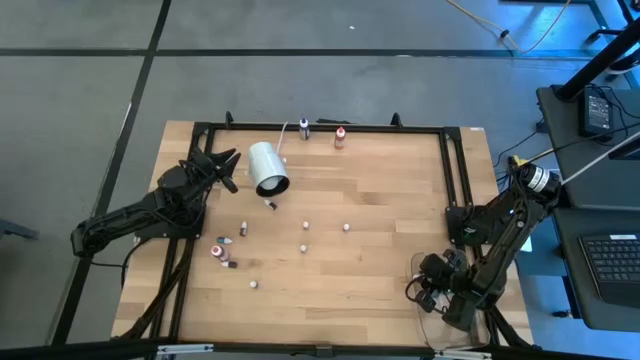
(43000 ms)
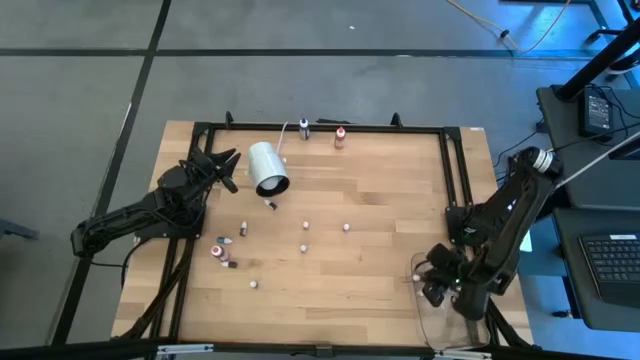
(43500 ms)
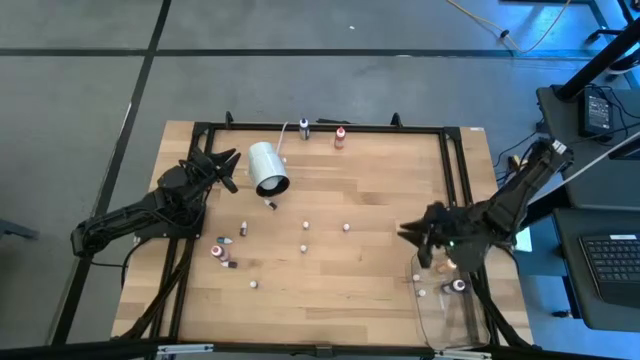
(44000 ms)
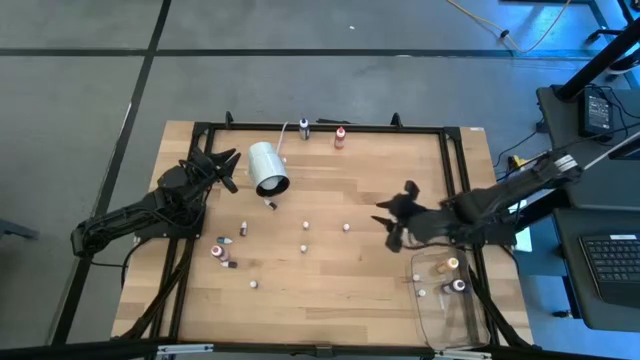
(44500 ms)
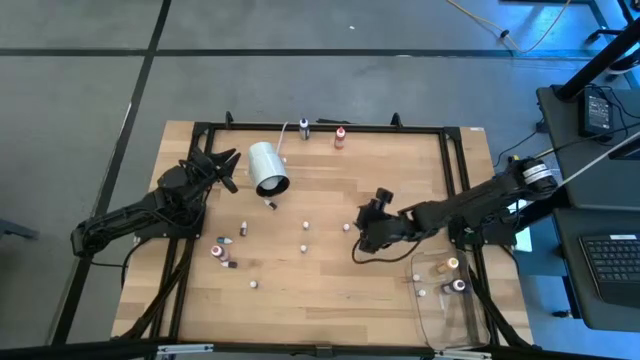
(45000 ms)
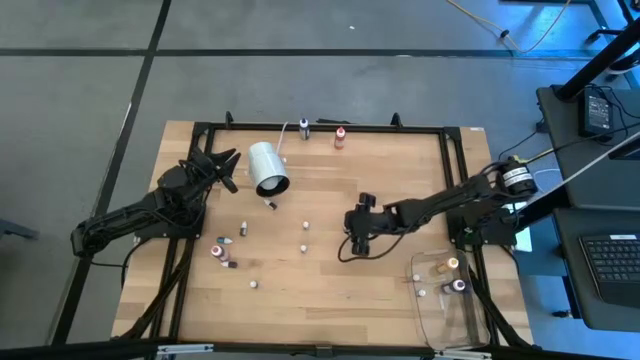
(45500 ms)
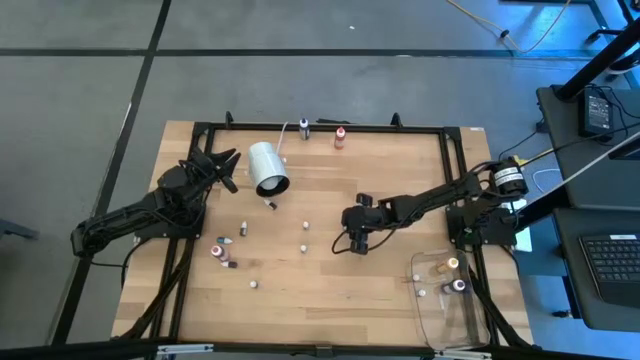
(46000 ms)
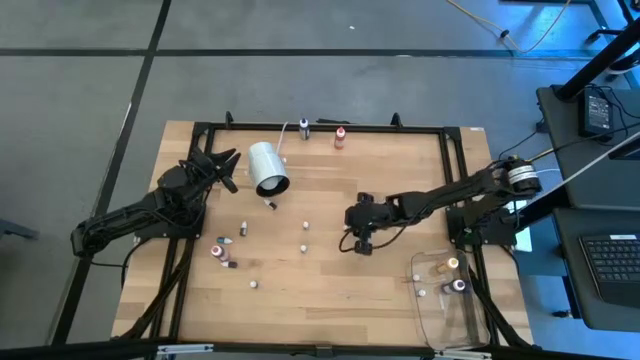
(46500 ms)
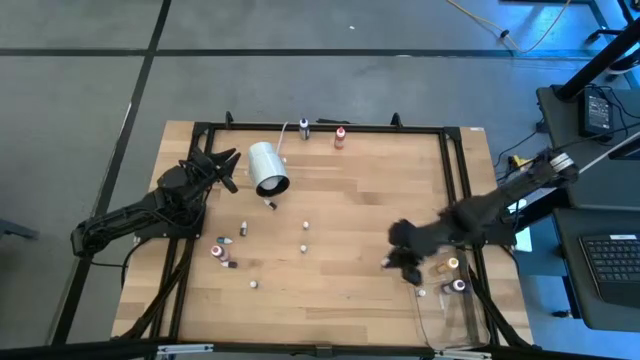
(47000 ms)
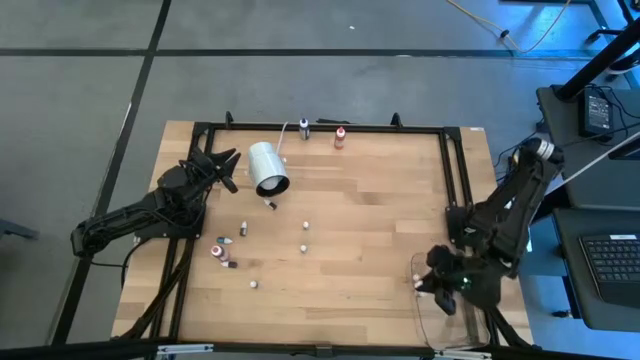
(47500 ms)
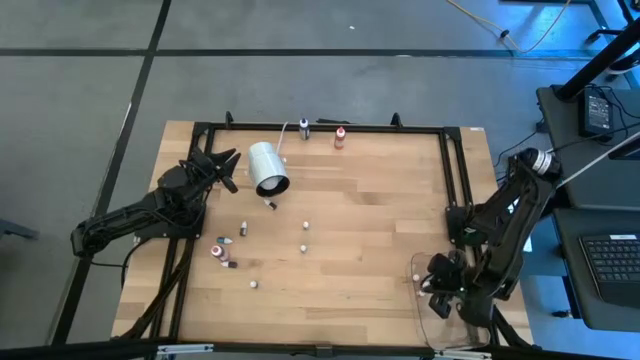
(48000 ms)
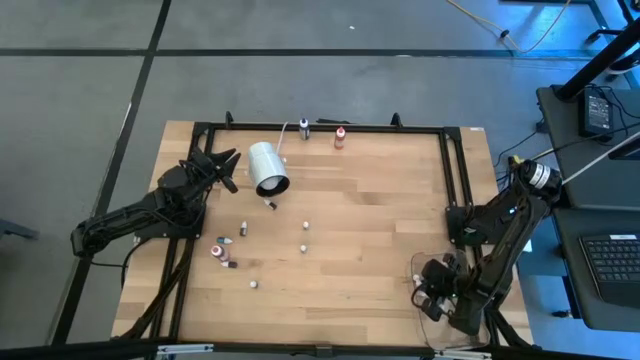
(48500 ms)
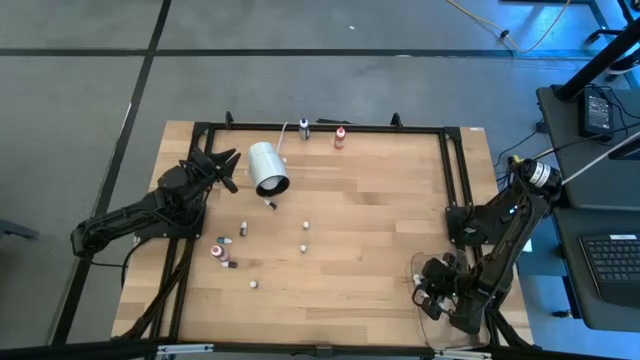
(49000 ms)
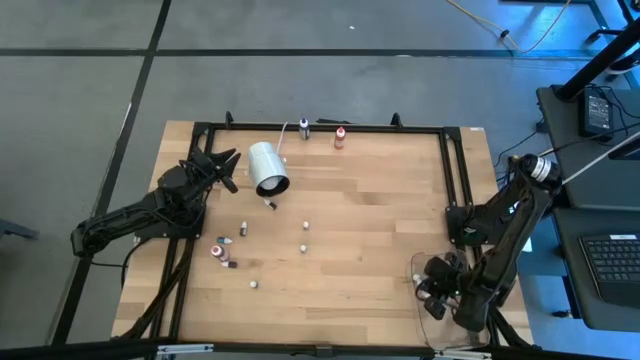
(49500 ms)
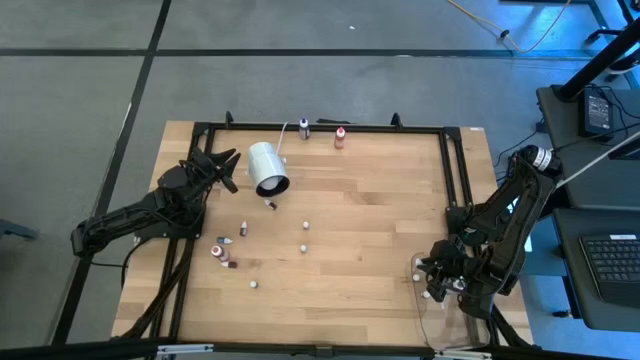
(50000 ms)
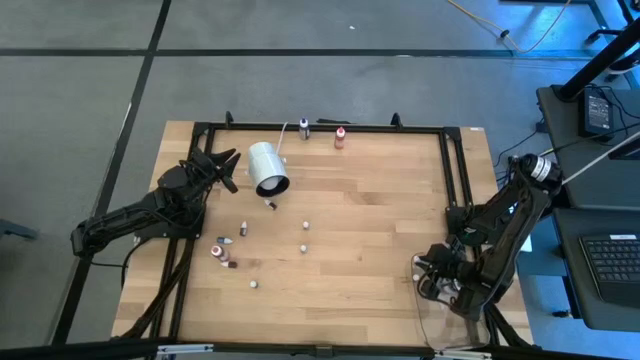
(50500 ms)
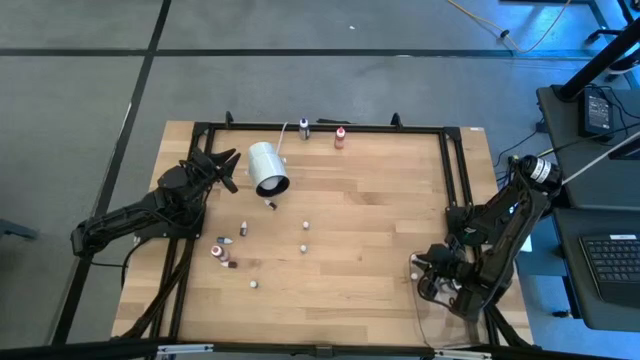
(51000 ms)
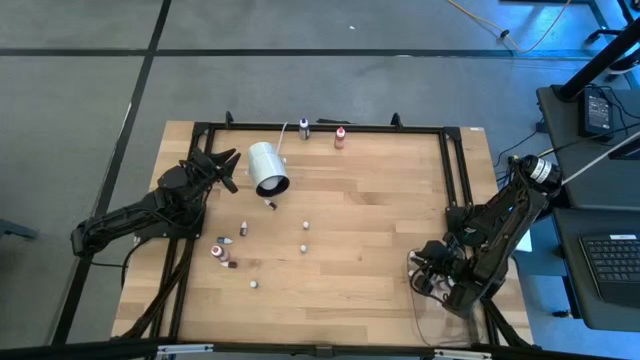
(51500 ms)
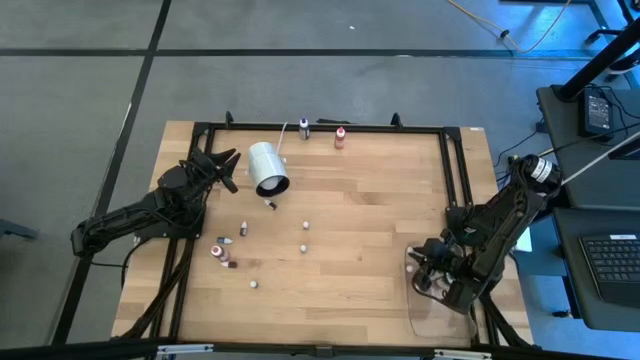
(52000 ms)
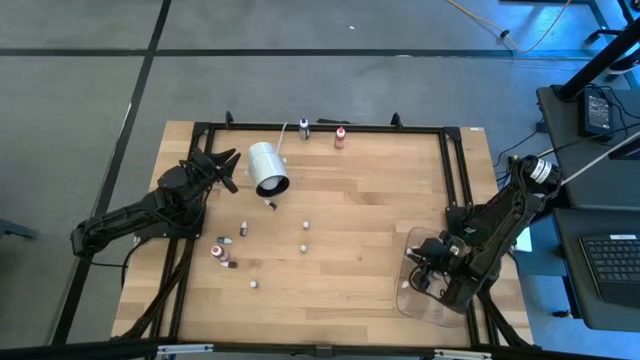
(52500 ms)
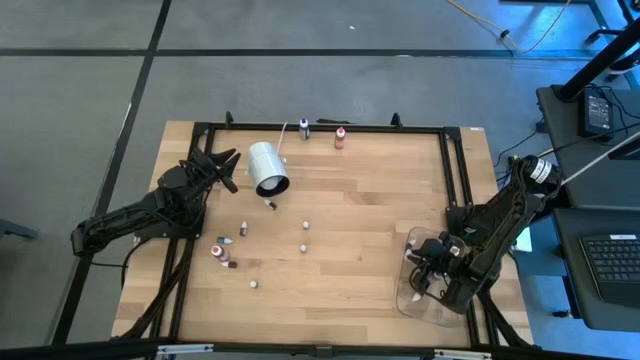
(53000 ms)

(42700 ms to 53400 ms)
Task: Pick & Place food coloring
Put the right small pink food coloring bottle into the transparent bin

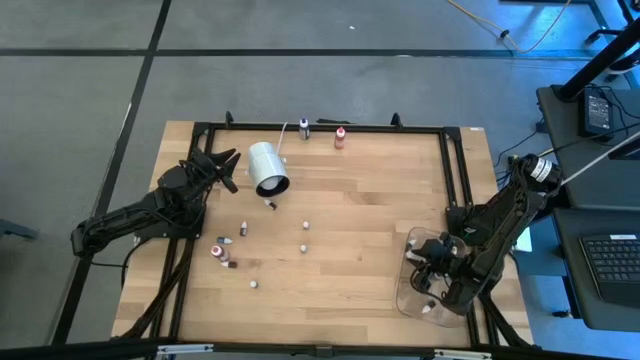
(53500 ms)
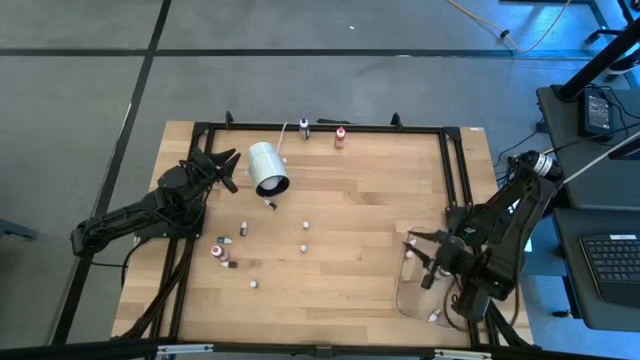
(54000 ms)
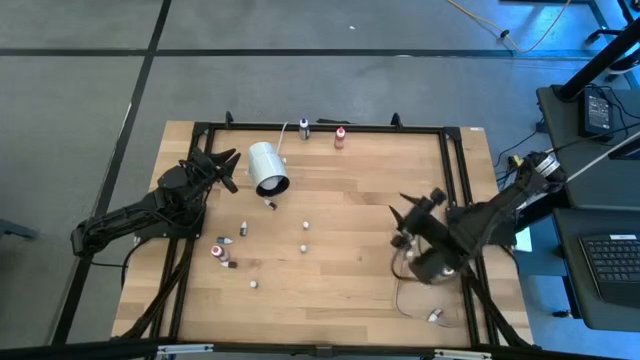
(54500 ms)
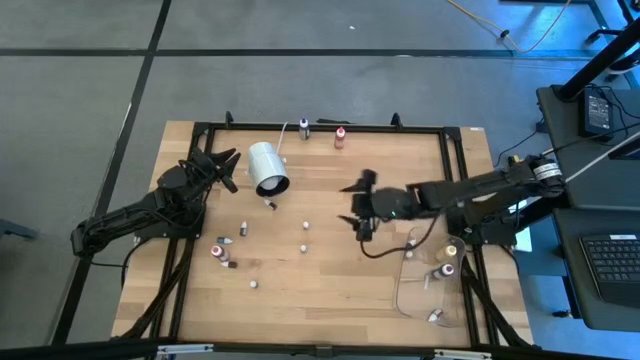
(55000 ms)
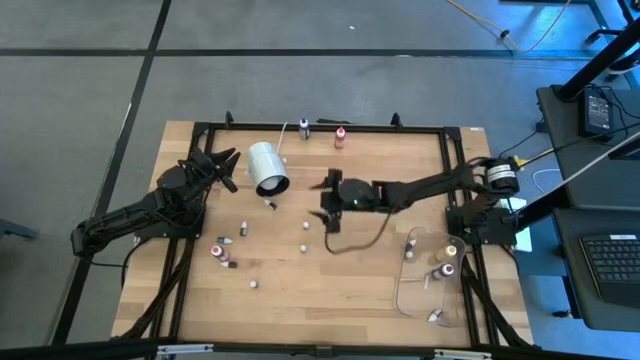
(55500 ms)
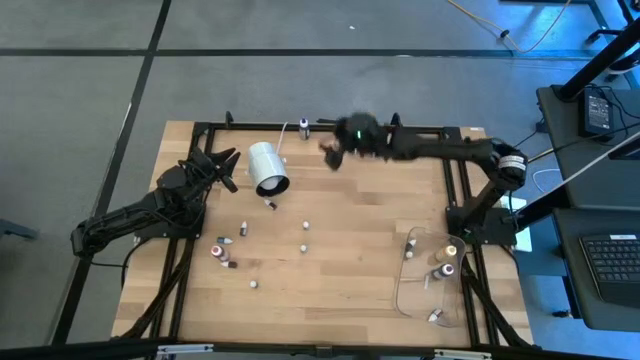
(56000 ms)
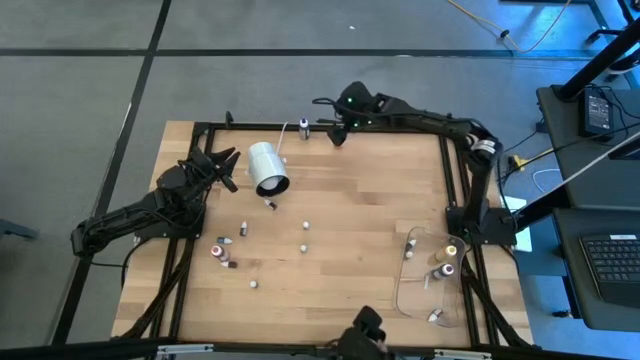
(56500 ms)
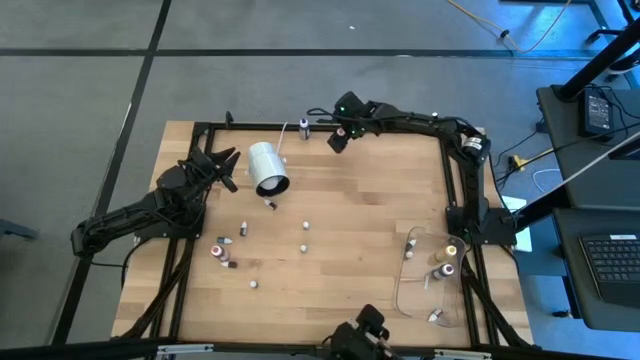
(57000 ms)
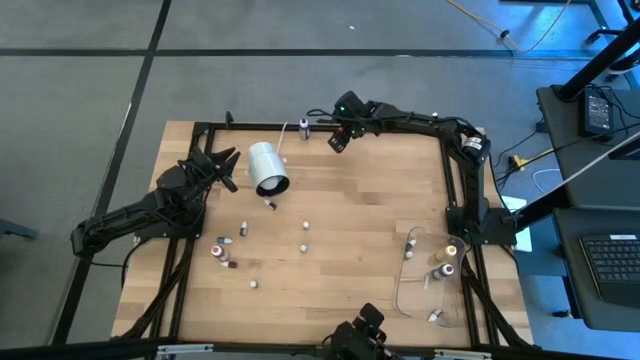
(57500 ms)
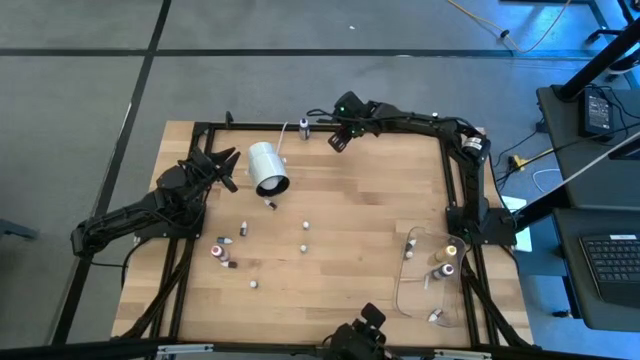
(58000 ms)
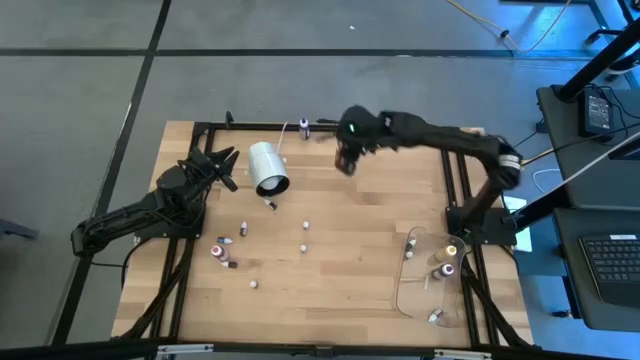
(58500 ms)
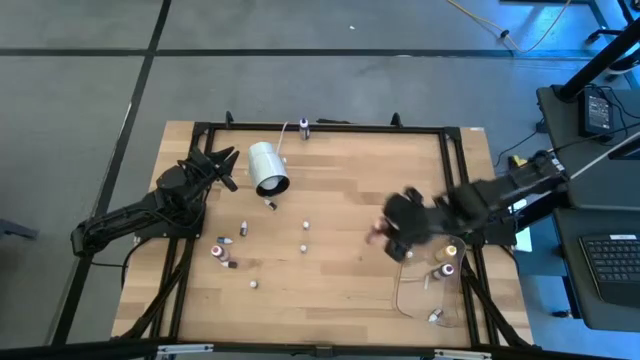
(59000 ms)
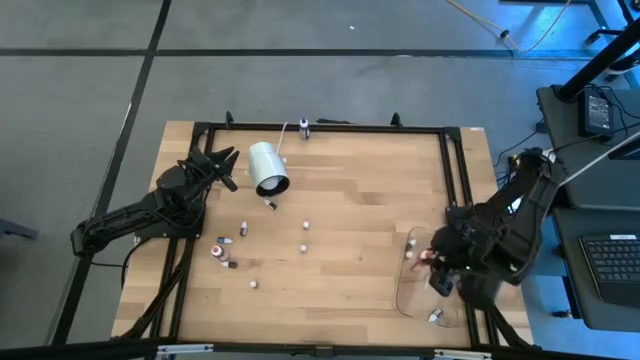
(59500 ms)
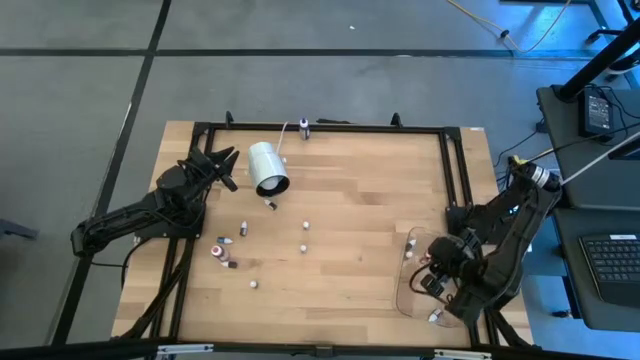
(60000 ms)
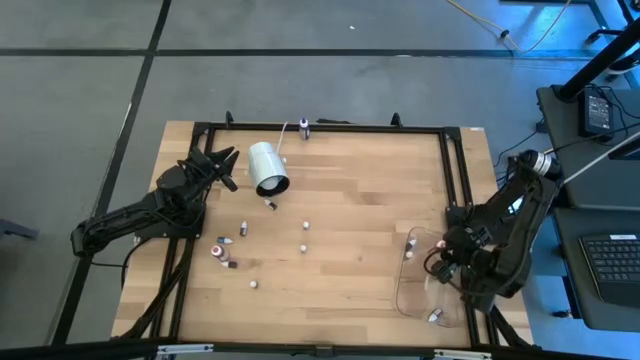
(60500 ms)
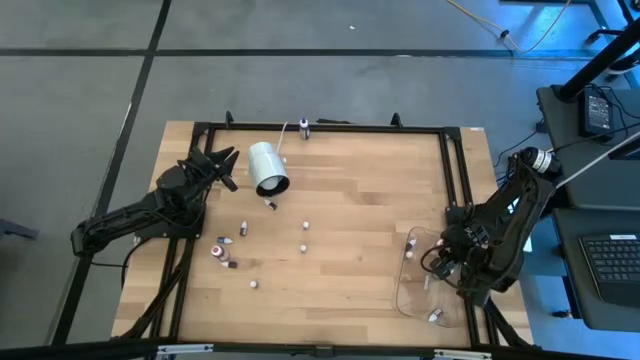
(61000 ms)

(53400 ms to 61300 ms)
Put the large orange food coloring bottle into the transparent bin

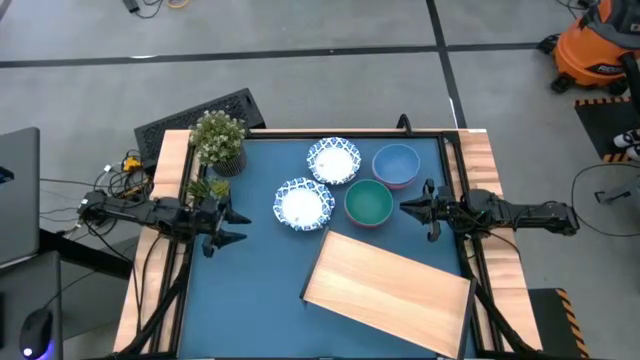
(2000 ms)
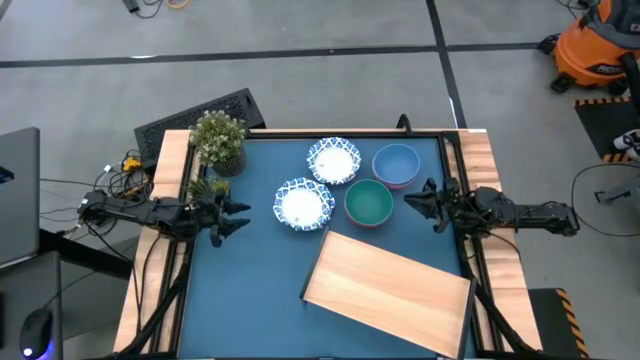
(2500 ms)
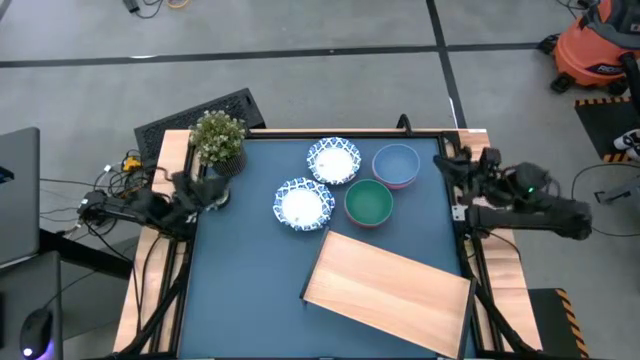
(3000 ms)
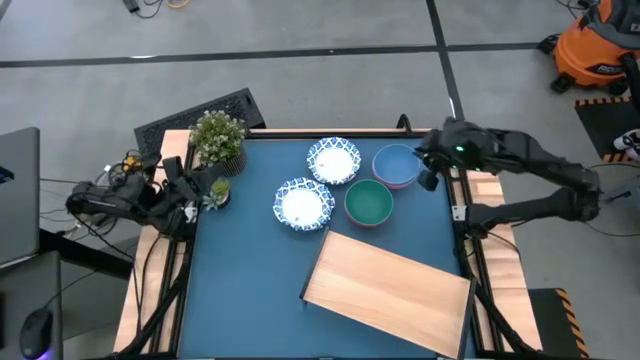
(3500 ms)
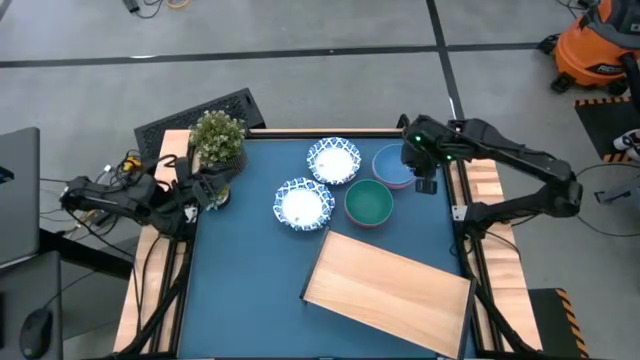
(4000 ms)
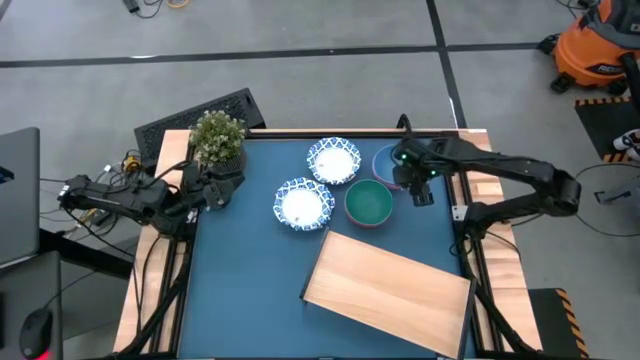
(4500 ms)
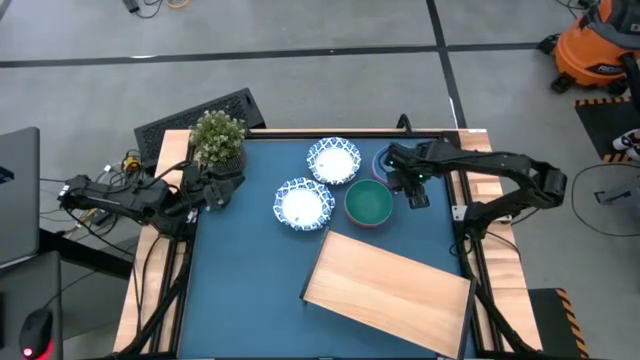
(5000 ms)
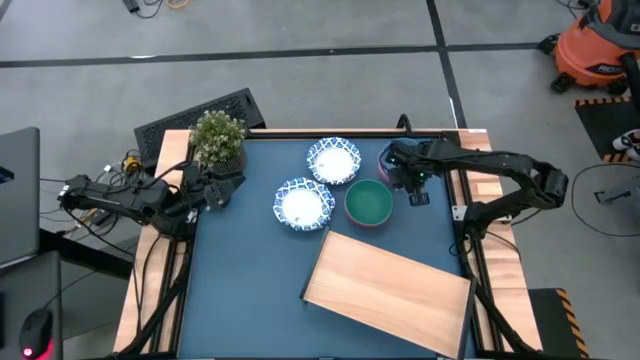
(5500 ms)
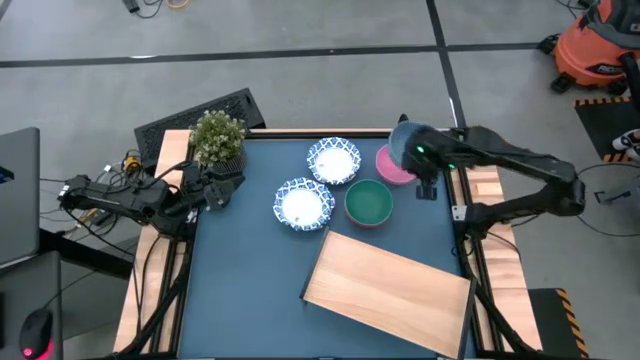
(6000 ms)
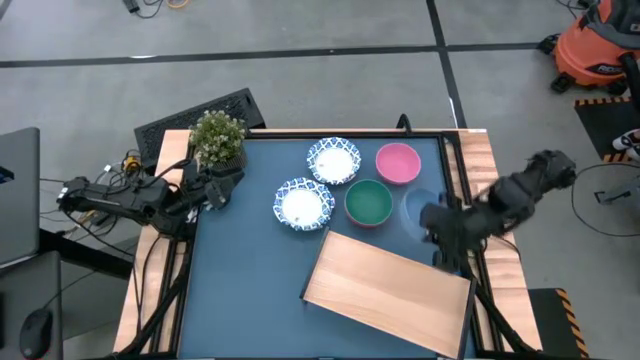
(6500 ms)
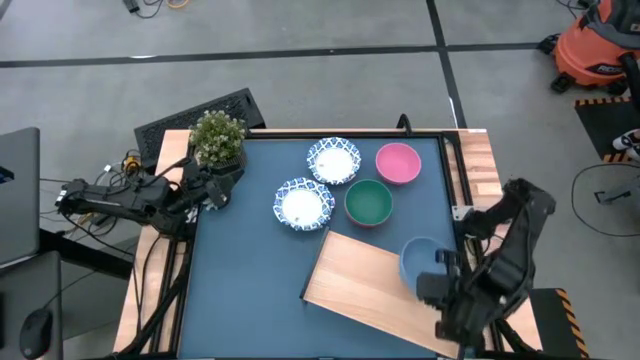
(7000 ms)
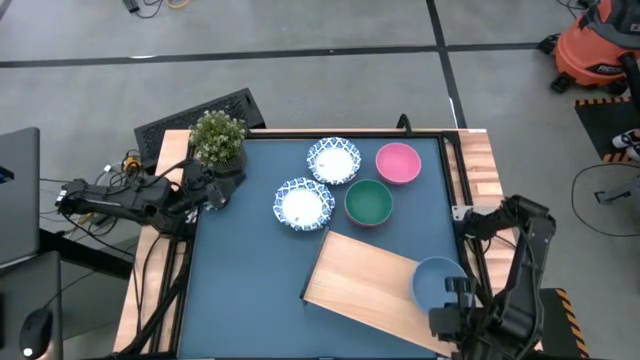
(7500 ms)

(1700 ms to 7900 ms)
Task: Place and stack bowls onto a shelf
Put the blue bowl on the shelf
